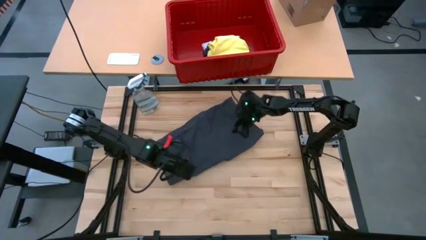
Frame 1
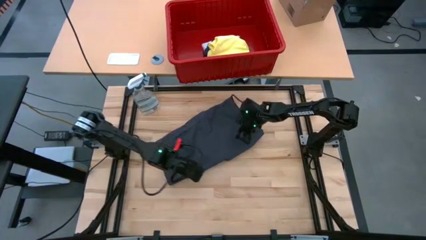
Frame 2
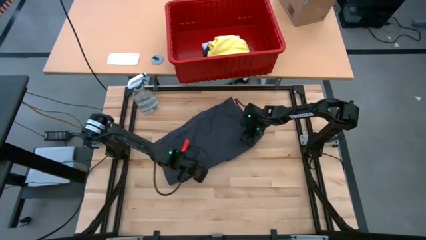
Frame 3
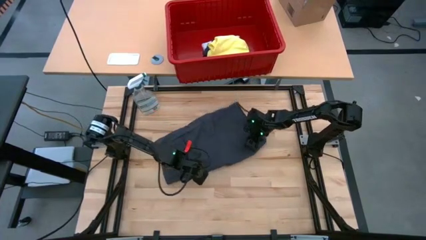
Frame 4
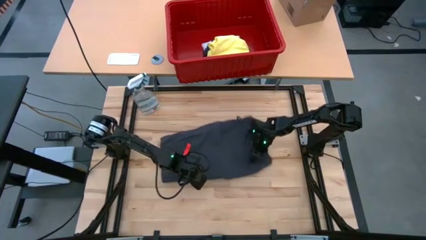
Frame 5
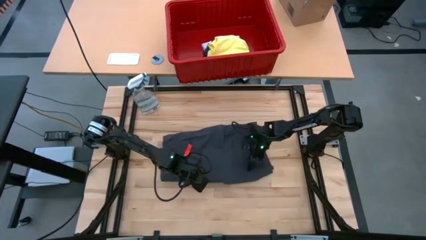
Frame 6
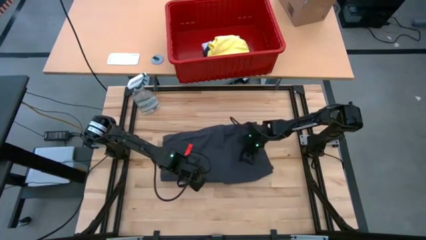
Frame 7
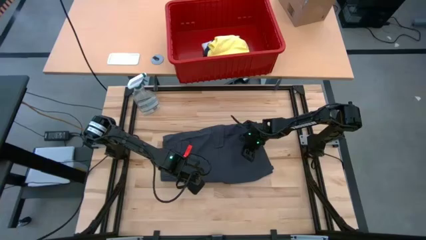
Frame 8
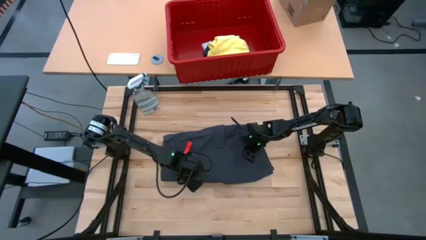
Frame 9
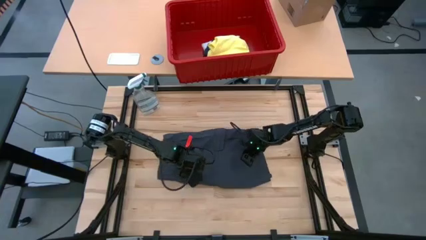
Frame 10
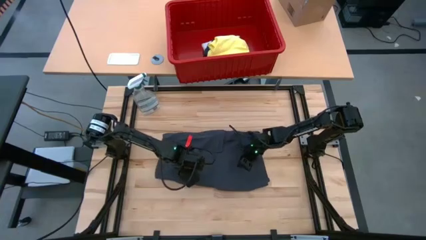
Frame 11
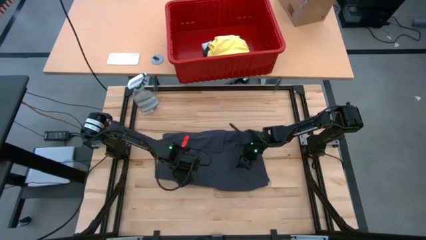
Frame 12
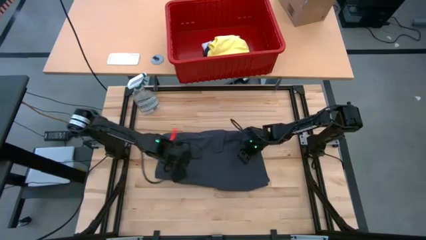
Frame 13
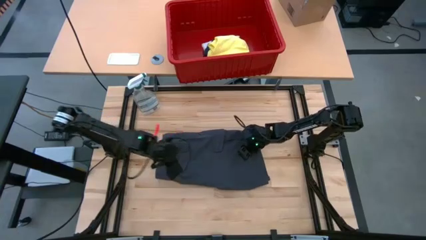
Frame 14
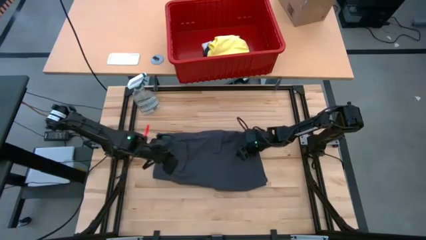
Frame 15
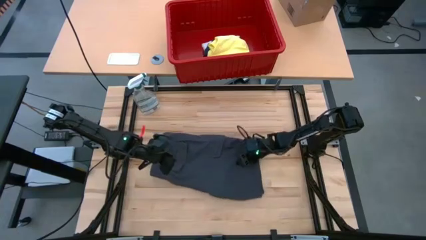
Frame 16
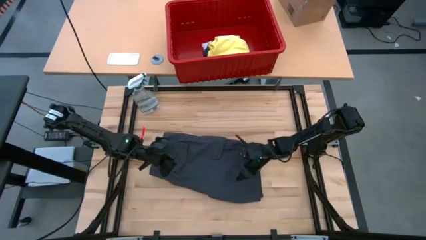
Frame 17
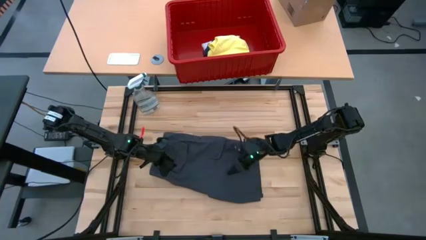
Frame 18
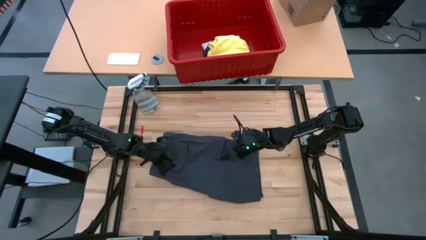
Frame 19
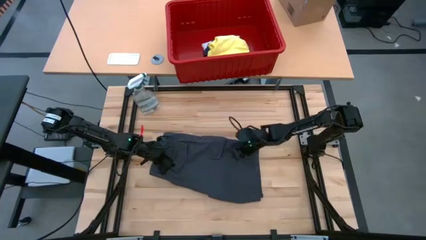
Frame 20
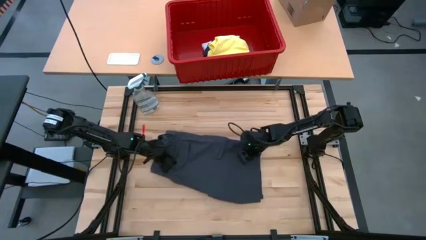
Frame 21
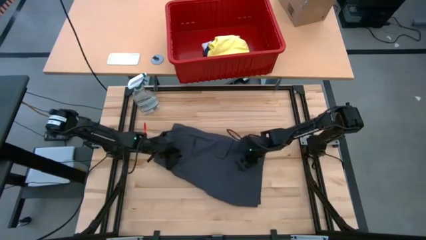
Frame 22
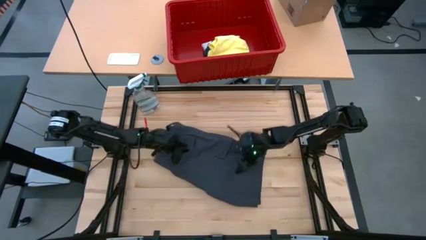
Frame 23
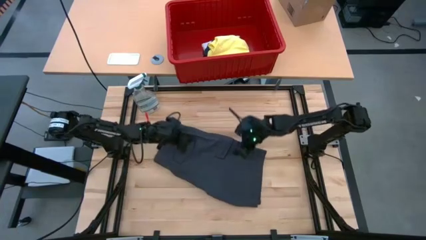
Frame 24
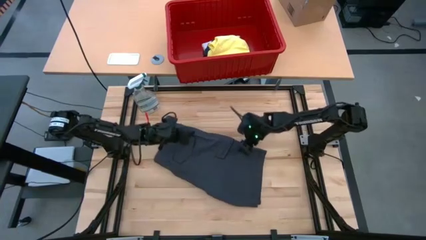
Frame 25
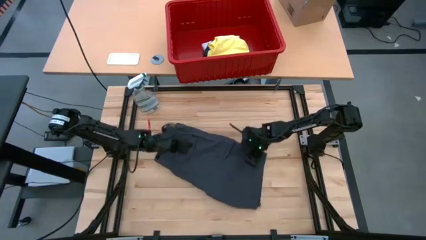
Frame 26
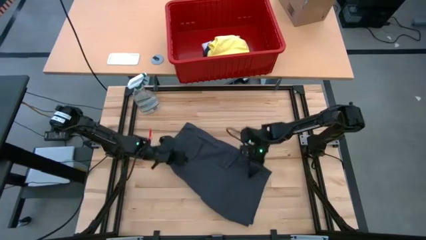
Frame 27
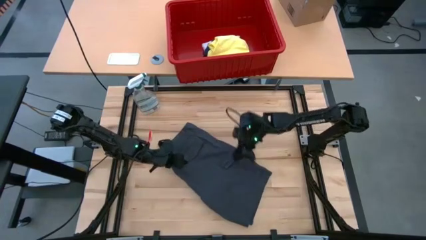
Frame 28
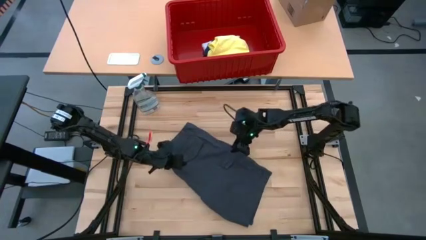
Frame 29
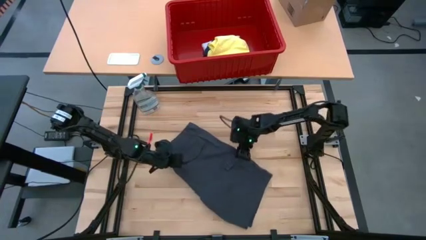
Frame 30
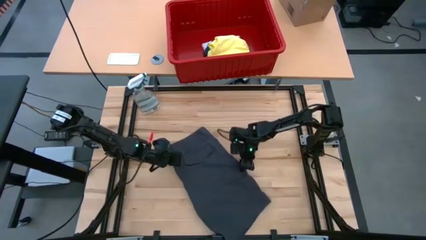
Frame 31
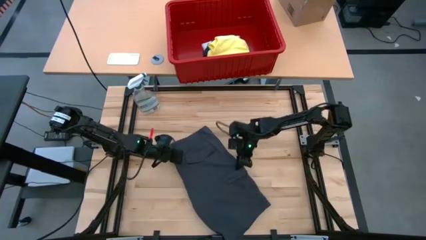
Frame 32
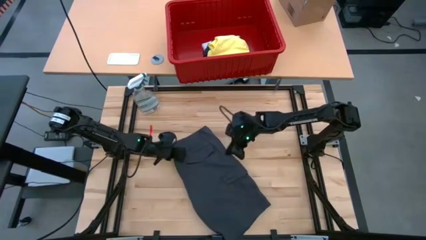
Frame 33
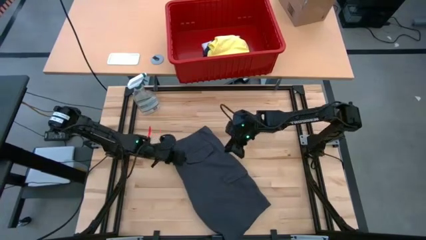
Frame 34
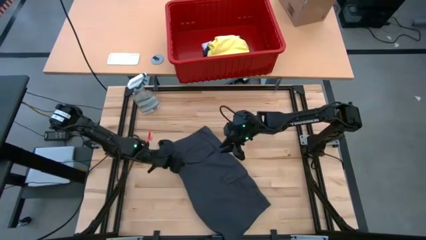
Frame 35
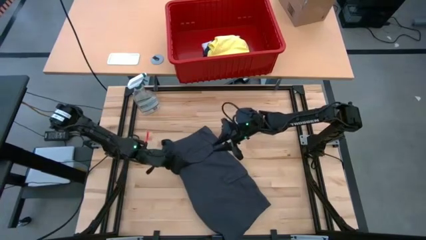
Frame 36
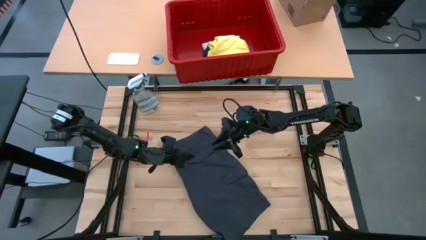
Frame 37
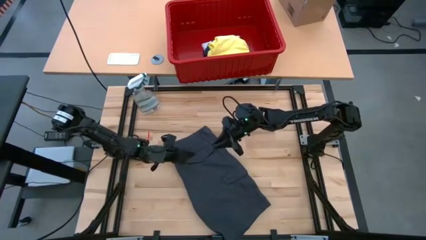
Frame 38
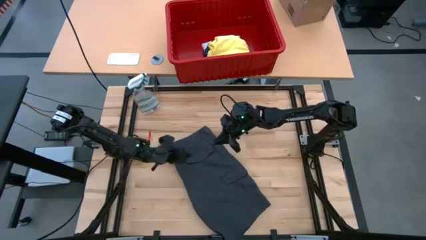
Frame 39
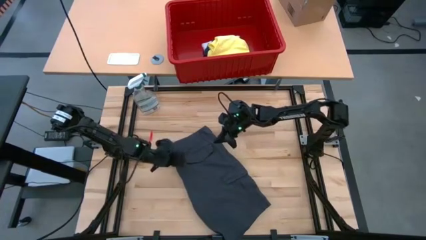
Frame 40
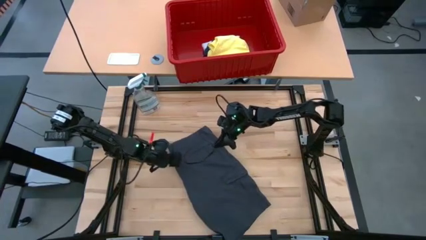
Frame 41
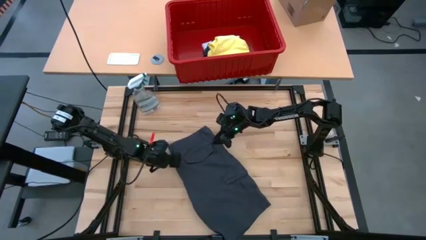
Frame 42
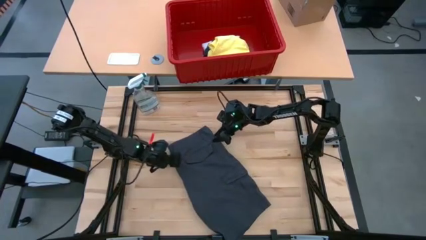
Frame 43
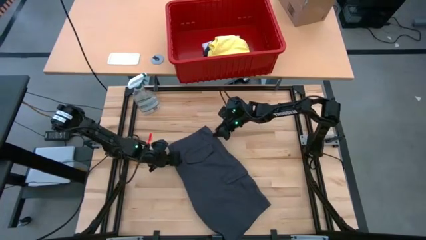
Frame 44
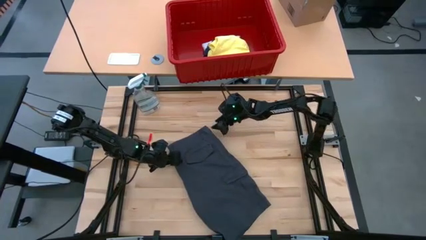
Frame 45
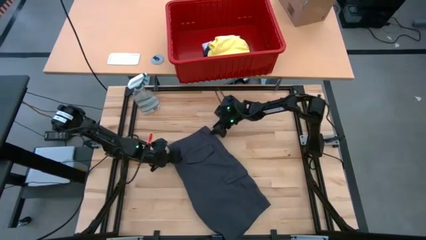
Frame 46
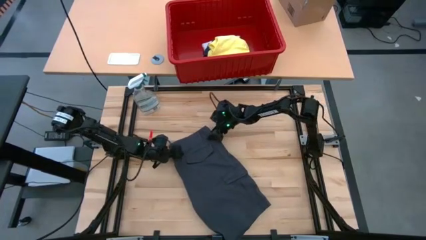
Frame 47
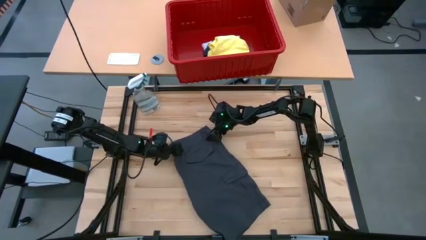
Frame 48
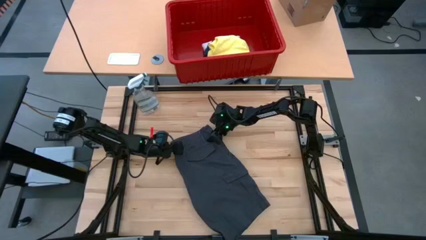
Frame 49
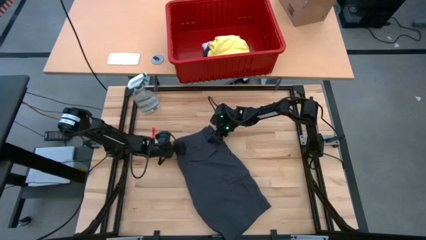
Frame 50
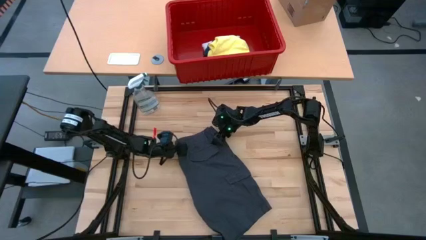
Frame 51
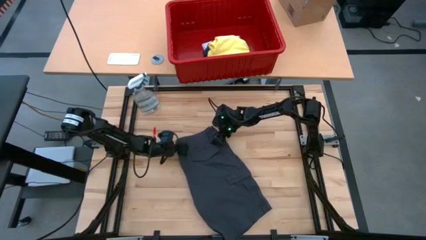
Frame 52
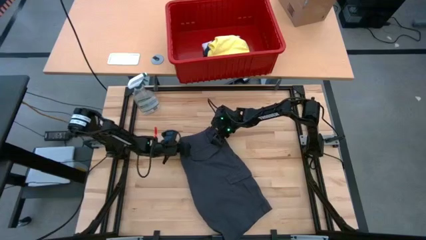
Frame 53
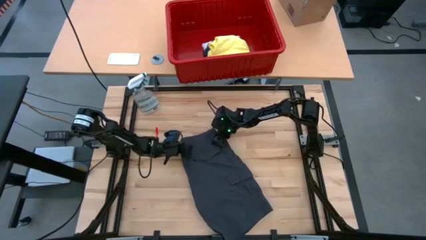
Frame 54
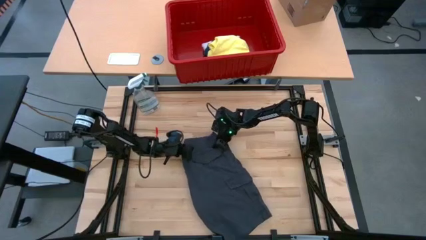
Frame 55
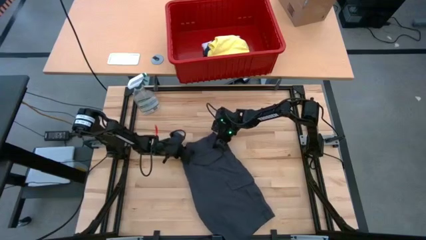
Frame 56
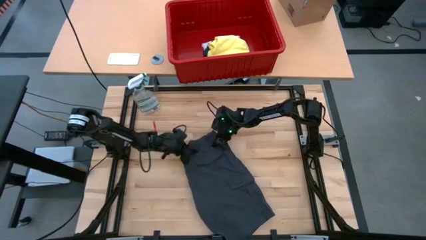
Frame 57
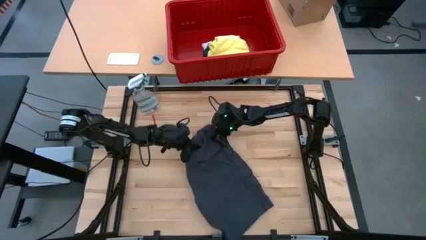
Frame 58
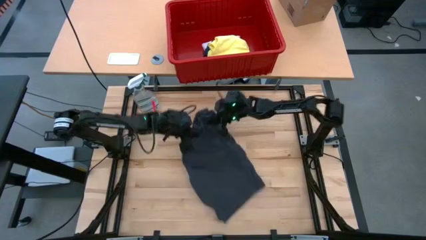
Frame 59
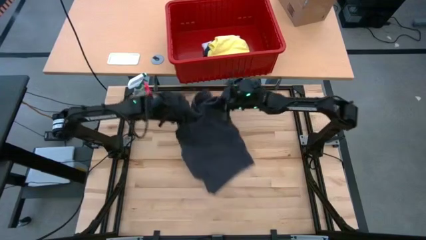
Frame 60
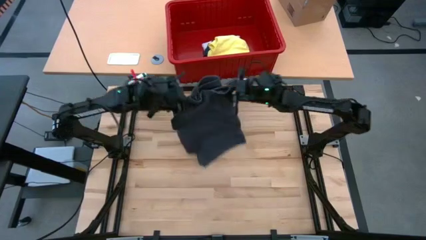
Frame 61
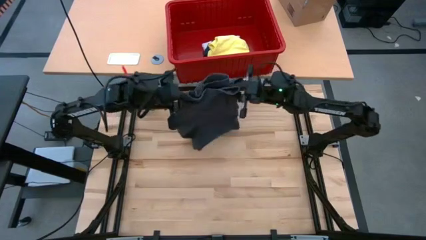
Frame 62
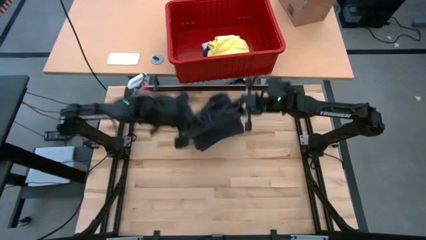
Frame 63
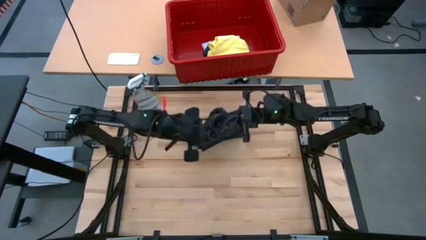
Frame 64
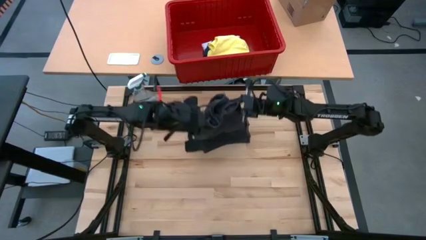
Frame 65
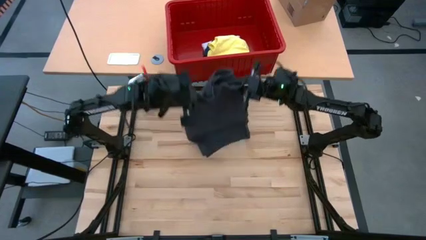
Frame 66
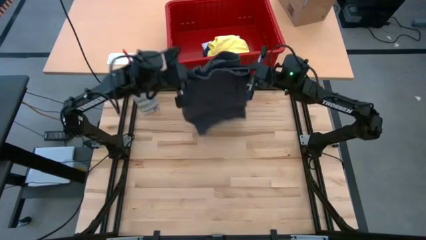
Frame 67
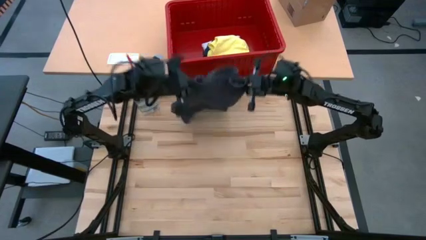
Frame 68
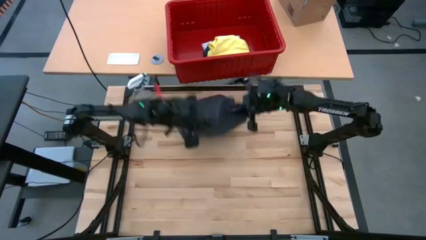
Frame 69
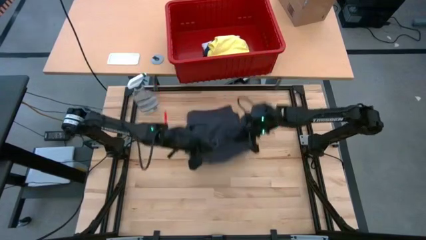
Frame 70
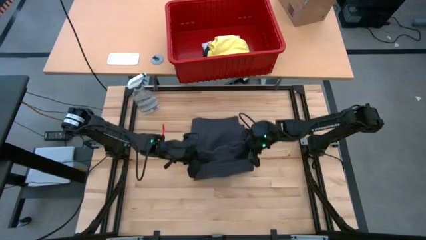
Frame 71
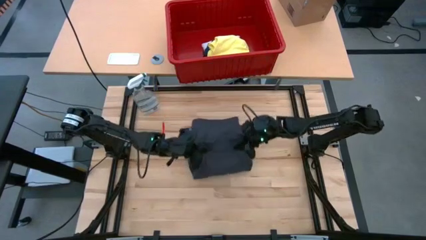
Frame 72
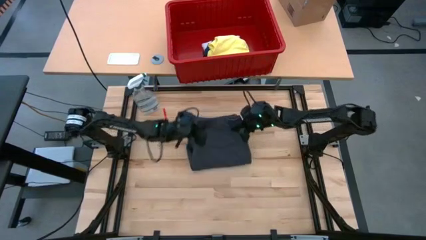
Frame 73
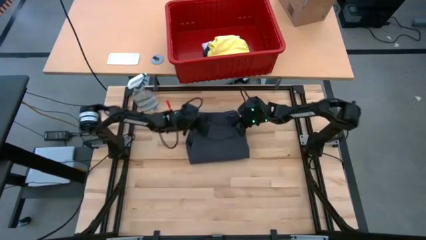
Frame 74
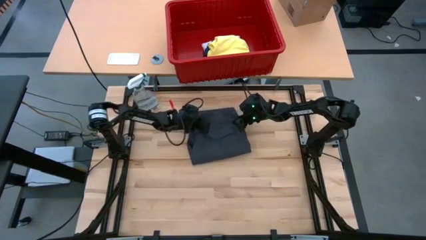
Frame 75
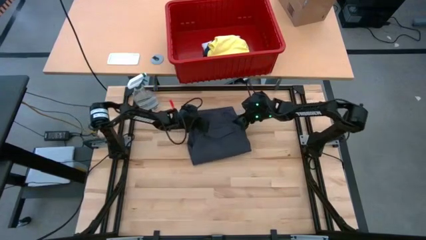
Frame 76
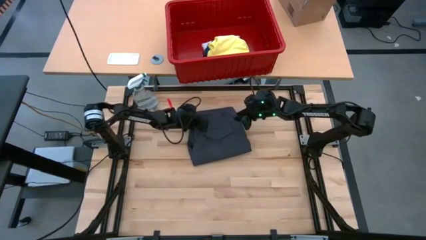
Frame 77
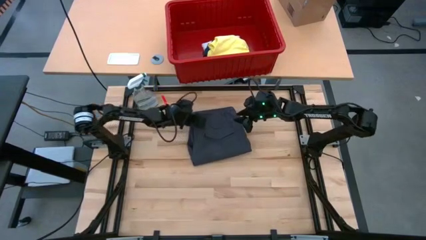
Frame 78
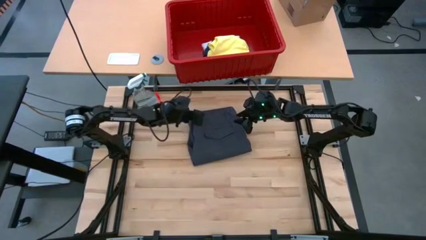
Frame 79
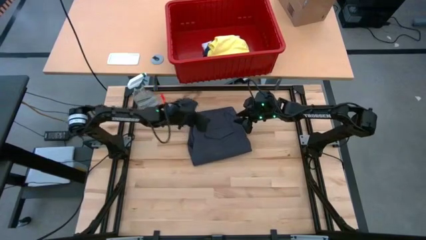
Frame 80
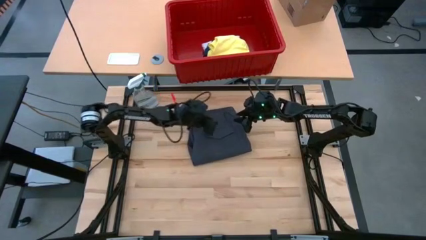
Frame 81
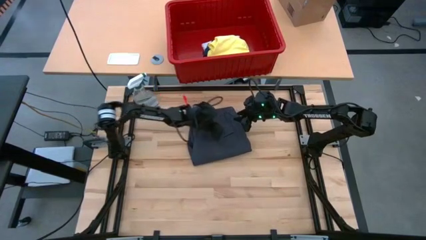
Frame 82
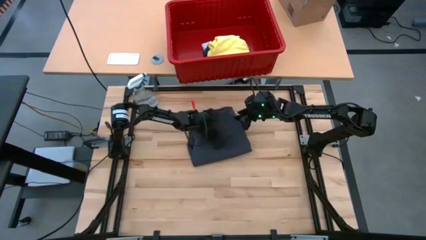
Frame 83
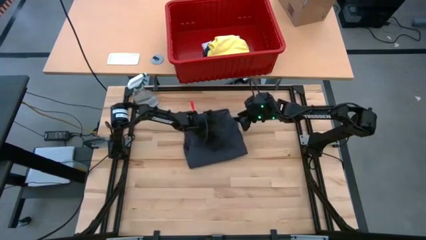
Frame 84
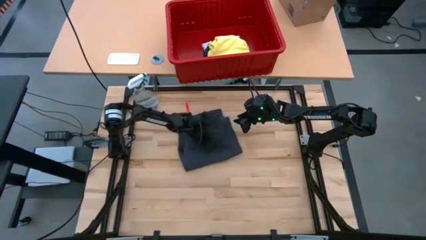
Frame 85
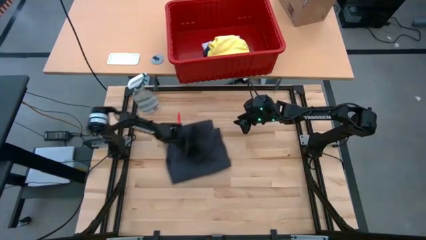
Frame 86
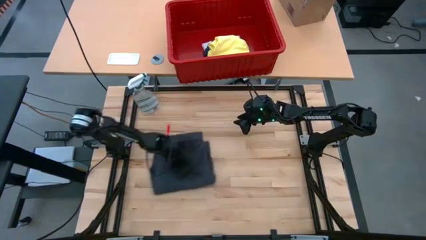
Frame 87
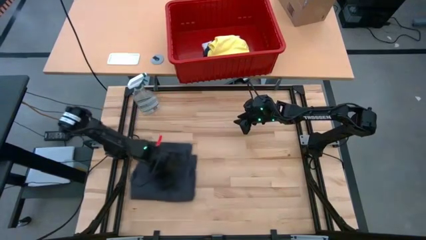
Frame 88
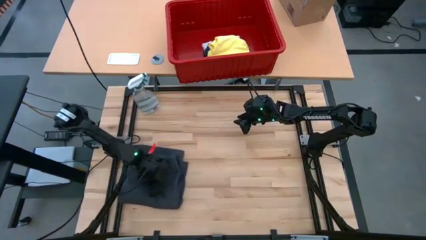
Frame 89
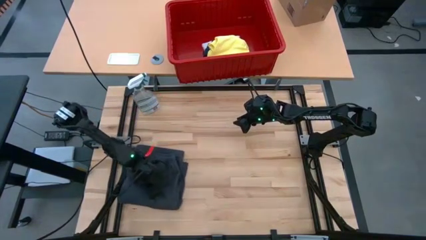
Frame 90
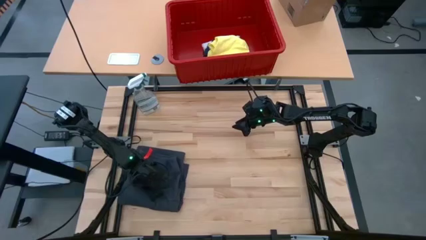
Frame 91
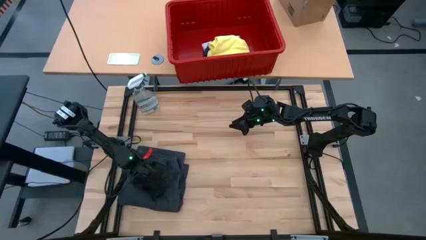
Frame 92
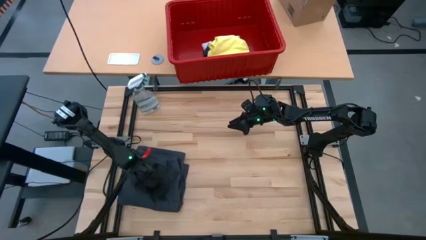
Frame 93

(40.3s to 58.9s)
Task: Fold Laundry from Bin
Fold the black short
